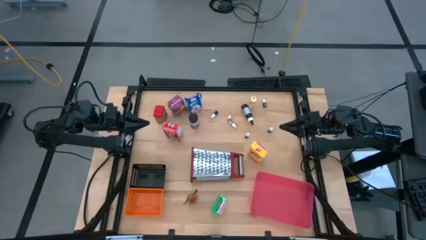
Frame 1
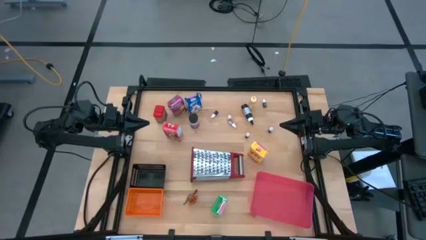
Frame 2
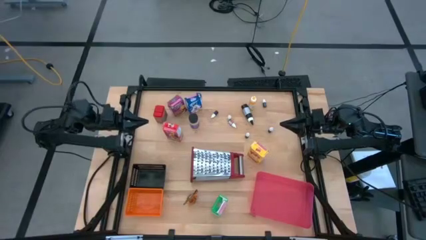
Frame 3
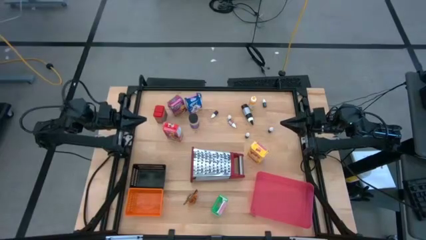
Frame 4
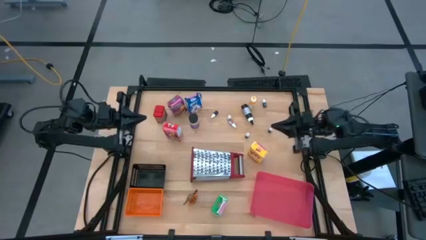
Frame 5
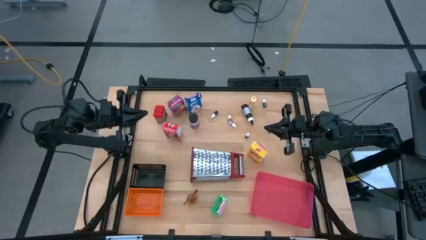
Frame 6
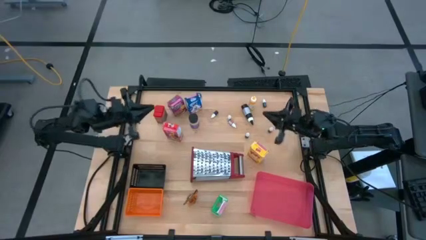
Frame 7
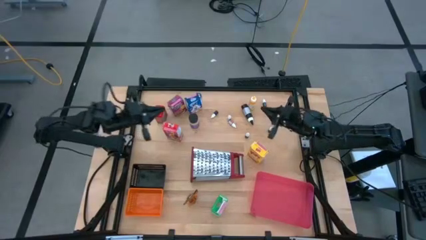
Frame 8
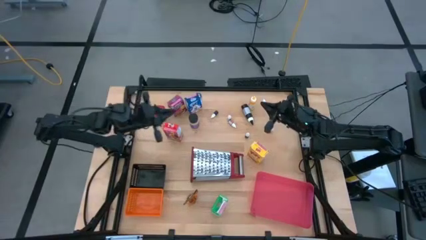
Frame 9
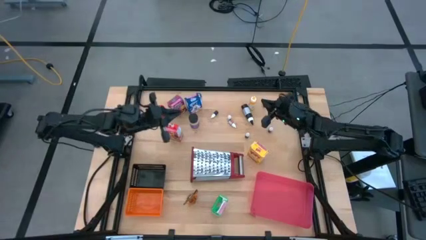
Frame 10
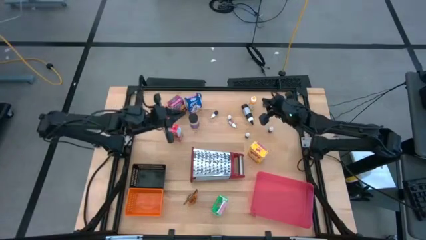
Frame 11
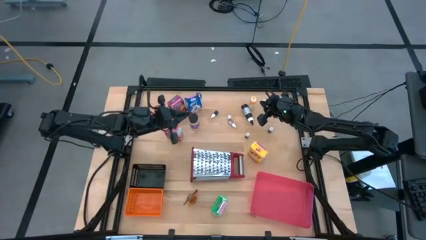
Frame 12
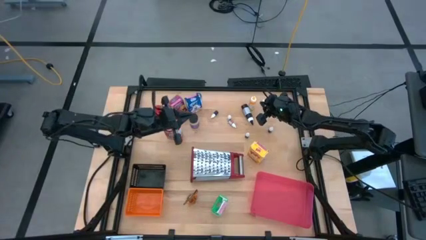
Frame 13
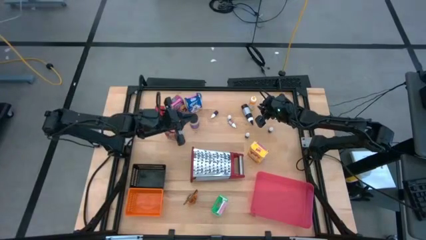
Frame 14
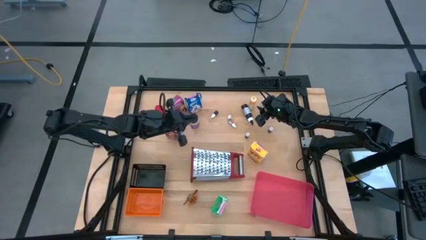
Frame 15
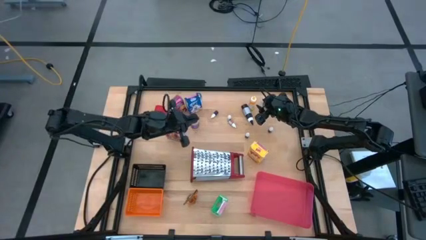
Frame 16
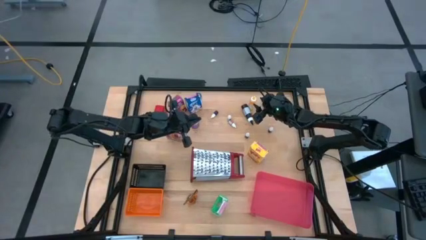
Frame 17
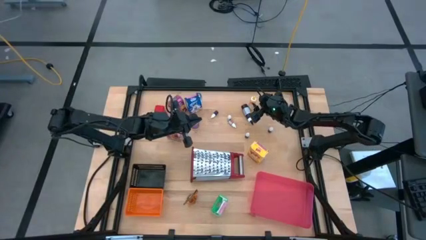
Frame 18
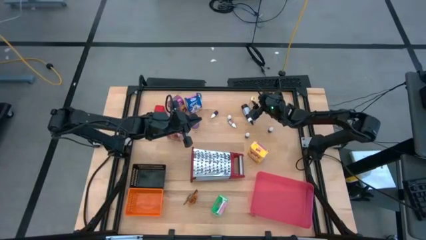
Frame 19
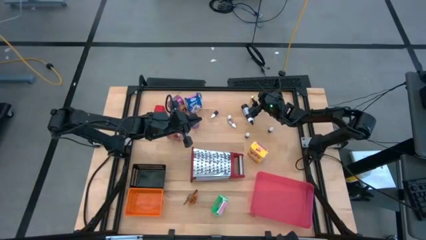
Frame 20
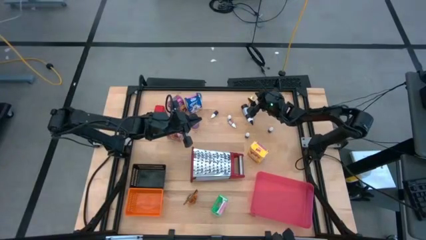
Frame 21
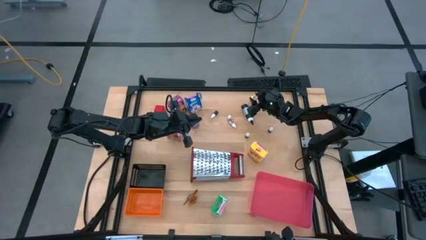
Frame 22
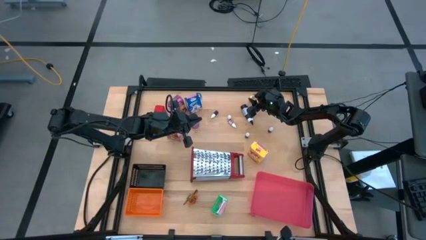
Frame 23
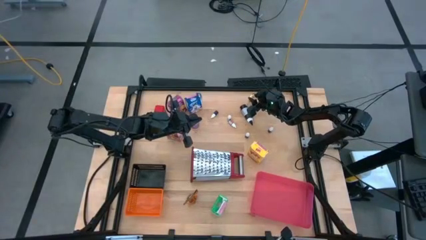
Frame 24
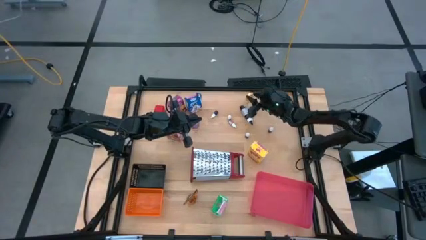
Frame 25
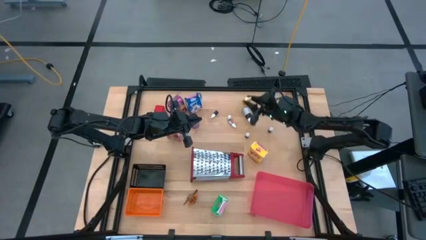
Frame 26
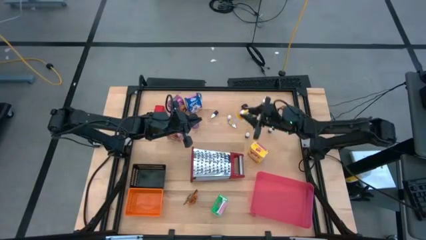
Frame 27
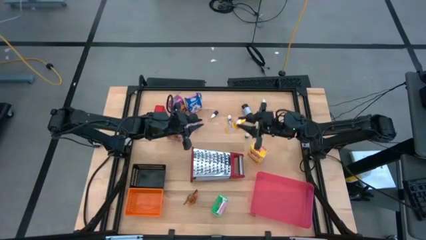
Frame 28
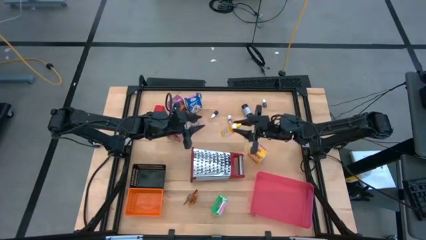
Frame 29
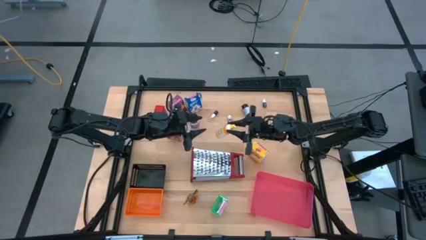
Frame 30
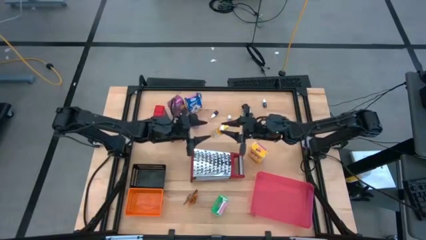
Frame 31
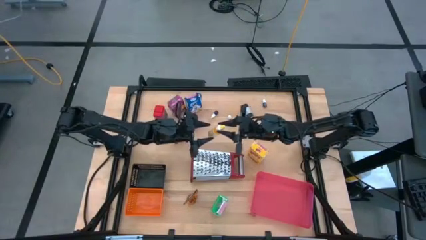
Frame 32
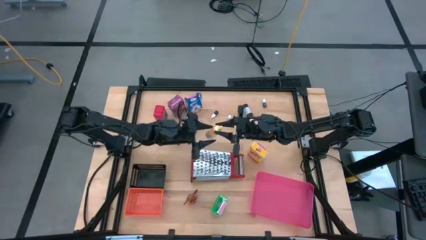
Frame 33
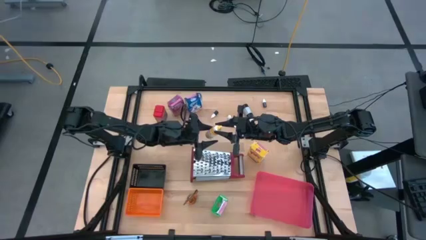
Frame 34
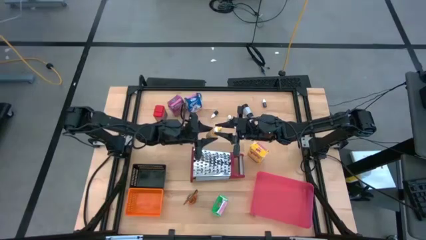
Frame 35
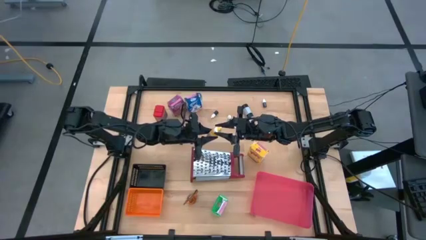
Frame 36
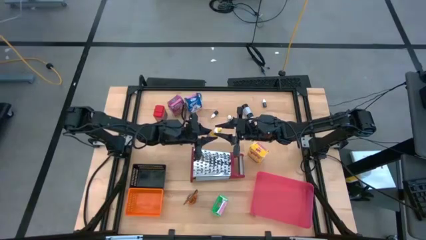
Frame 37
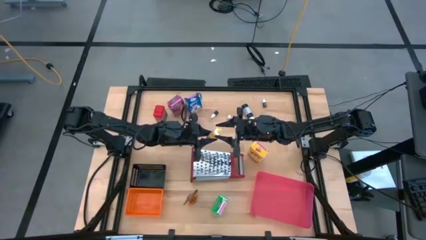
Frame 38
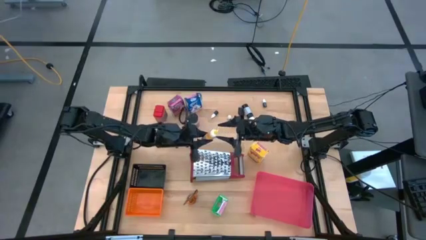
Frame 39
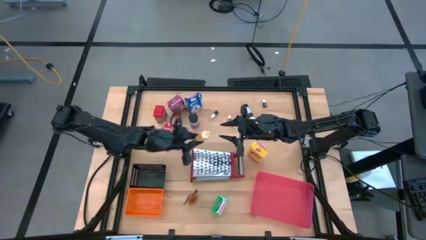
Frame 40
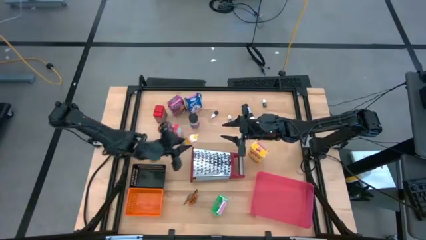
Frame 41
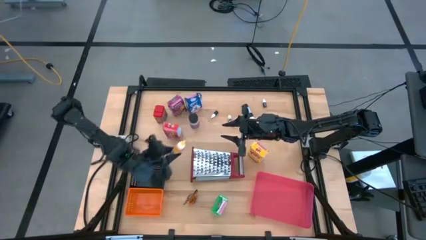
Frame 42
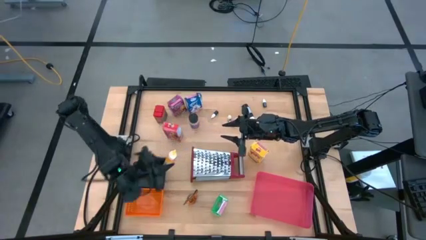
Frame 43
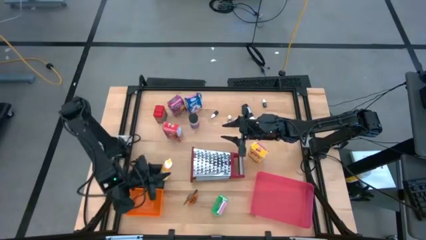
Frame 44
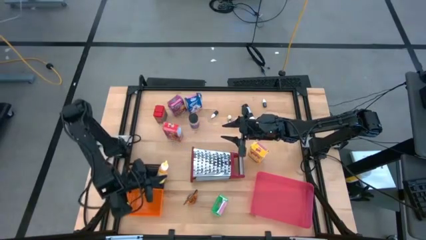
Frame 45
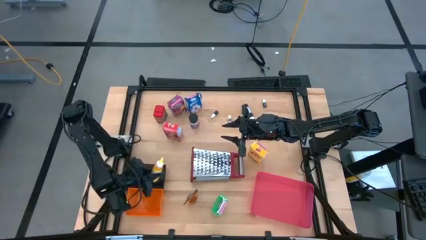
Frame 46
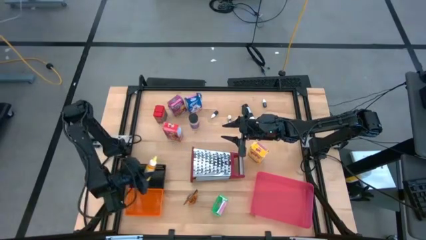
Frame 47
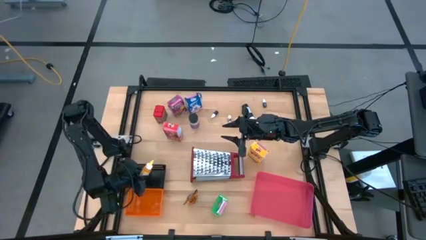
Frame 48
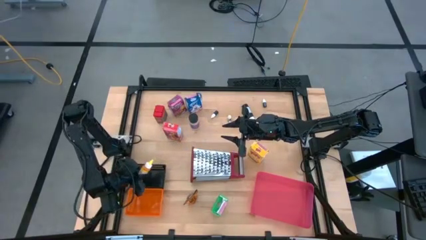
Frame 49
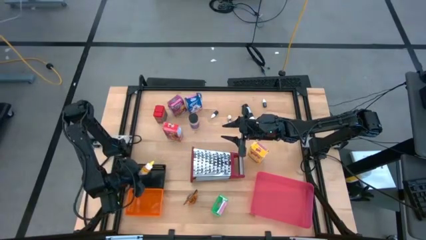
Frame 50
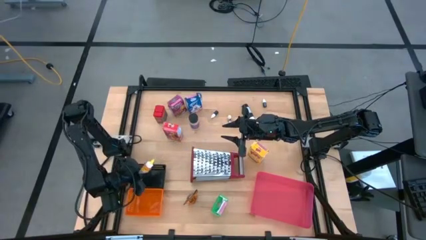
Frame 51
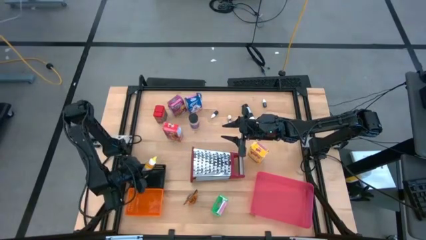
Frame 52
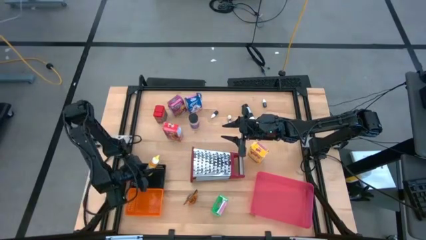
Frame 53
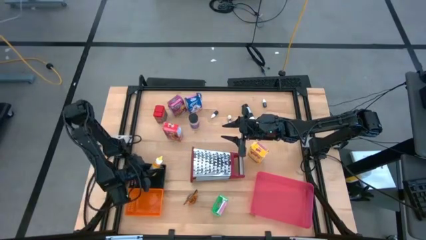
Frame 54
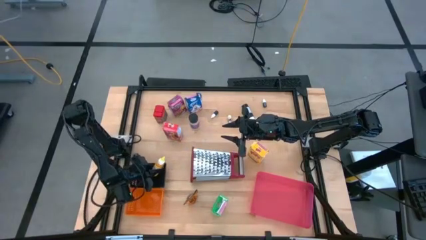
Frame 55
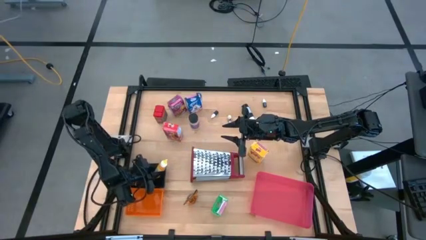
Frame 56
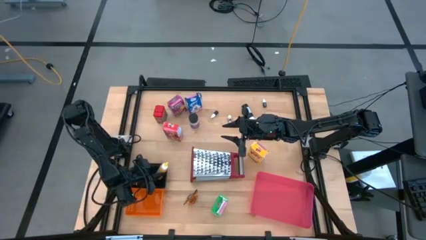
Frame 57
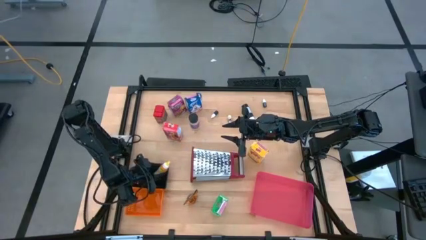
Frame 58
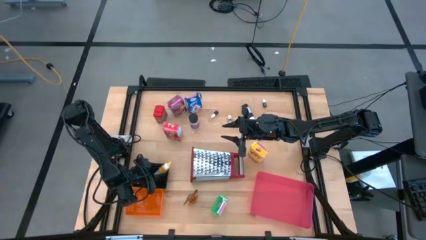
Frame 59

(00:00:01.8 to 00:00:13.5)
Task: Pick & Place Kitchen Items
Put the large yellow food coloring bottle into the black bin
